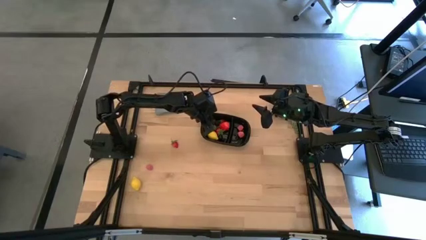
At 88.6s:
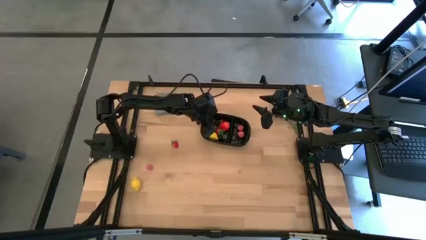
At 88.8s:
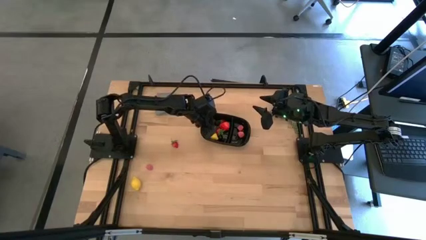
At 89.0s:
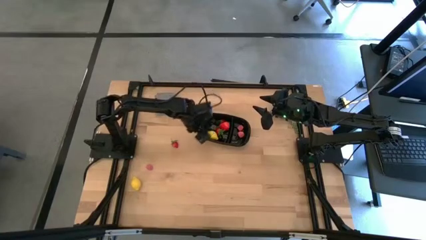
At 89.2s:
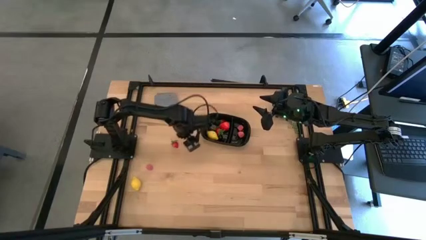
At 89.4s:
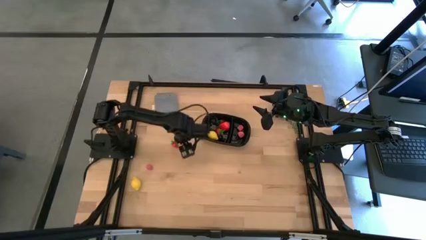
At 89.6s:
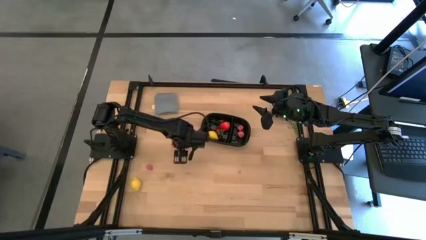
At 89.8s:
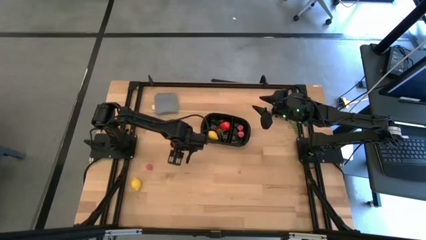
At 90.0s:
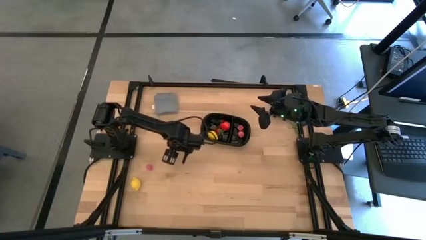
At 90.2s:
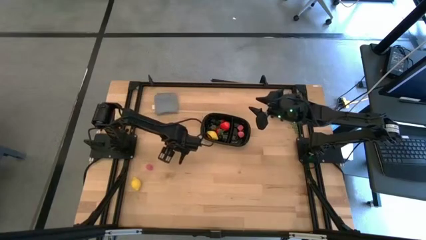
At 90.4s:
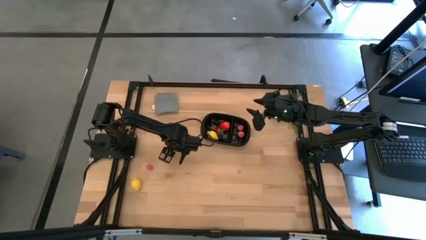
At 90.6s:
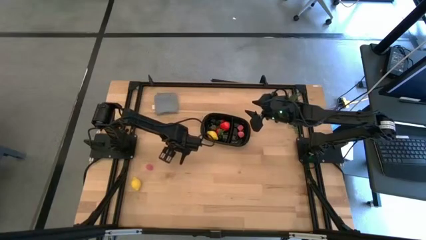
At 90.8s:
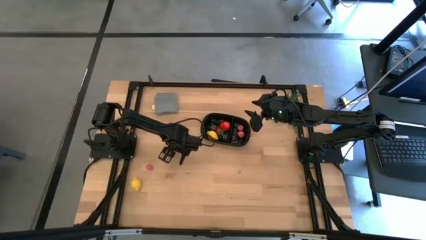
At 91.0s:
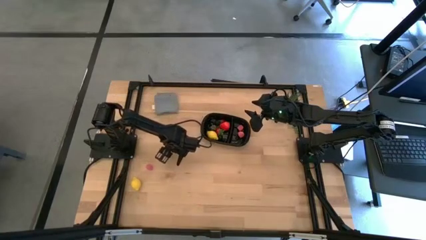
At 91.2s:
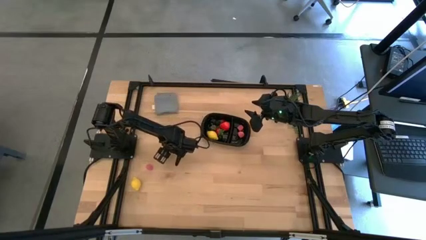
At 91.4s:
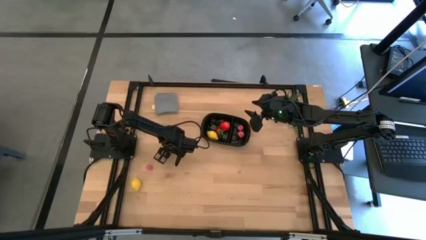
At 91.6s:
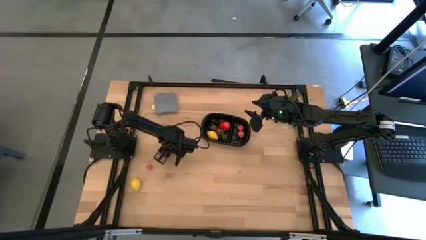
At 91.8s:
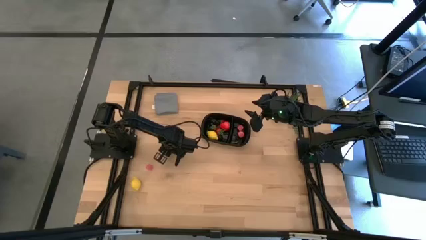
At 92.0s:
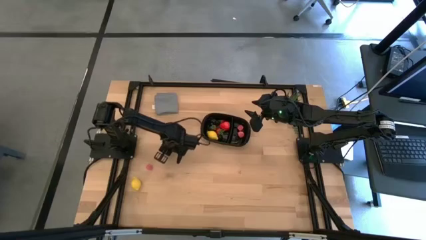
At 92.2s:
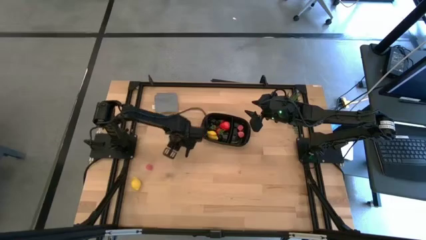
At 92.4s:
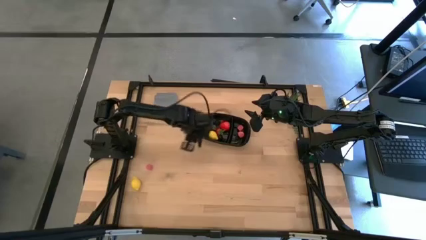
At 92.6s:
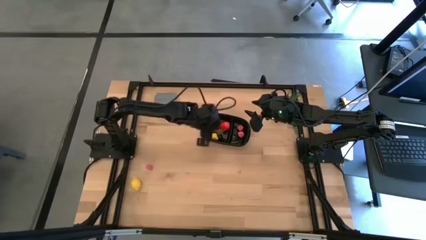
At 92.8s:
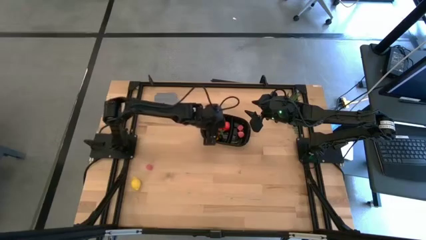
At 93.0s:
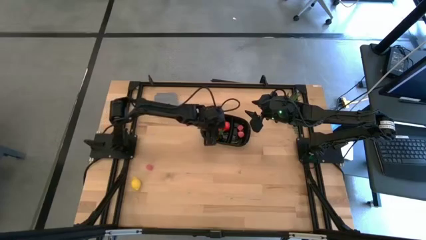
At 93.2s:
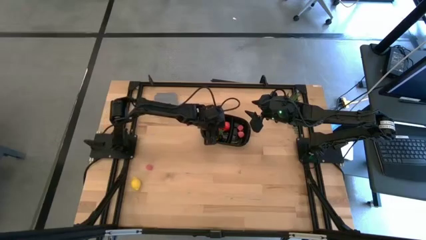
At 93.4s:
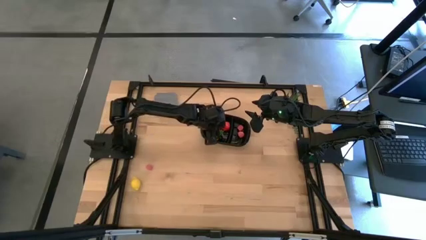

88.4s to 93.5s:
Task: Pick and placing Produce into tupperware
Put the red strawberry into the black container

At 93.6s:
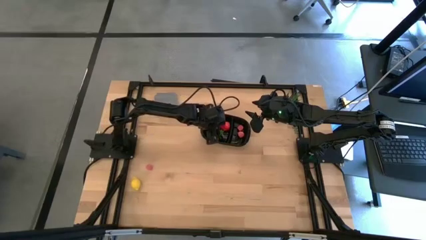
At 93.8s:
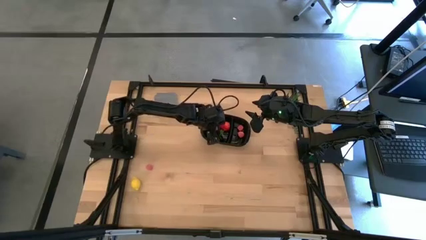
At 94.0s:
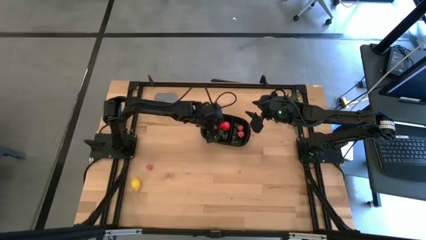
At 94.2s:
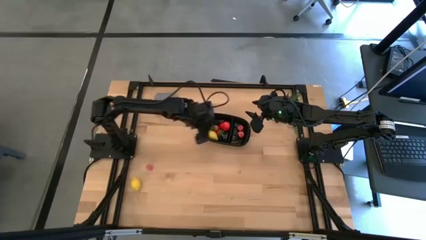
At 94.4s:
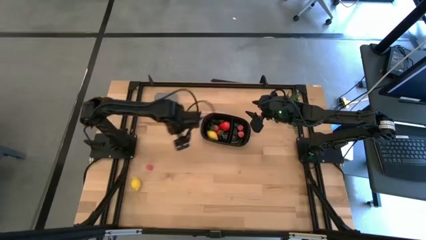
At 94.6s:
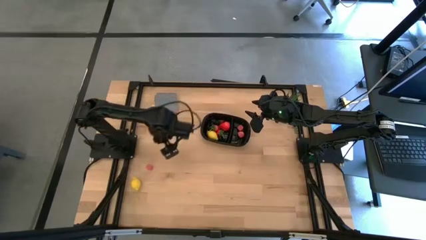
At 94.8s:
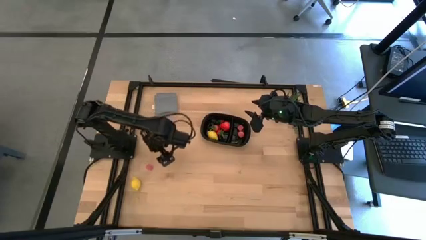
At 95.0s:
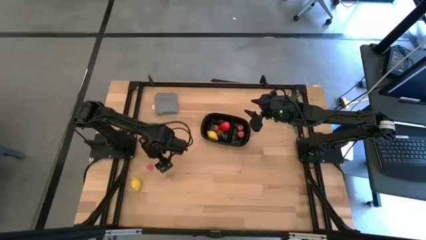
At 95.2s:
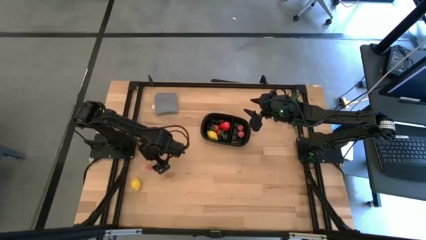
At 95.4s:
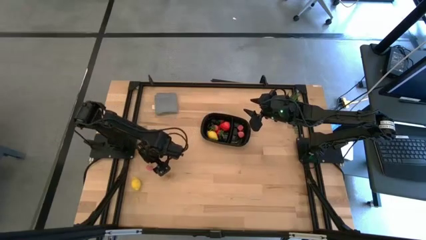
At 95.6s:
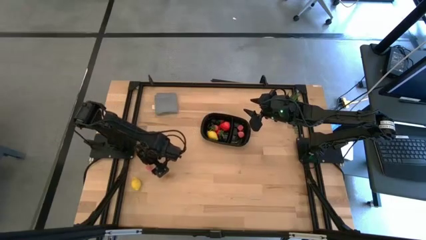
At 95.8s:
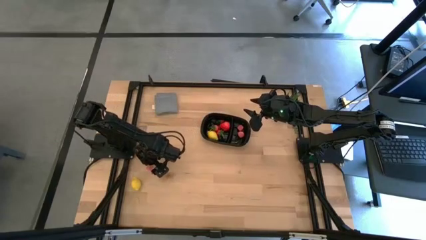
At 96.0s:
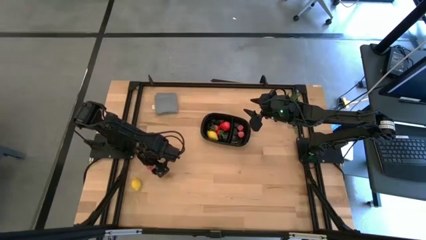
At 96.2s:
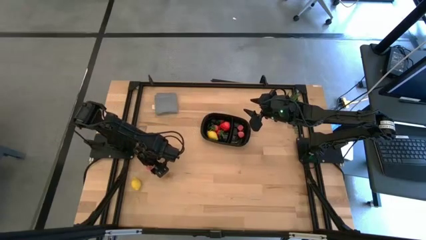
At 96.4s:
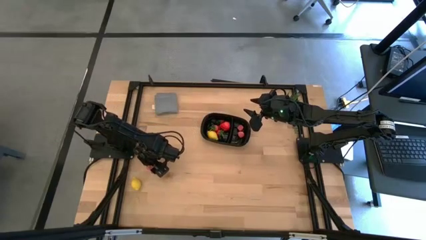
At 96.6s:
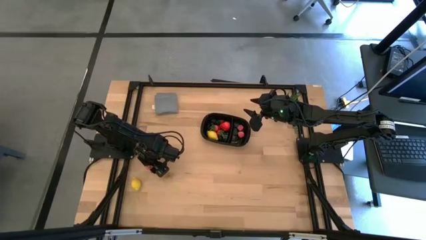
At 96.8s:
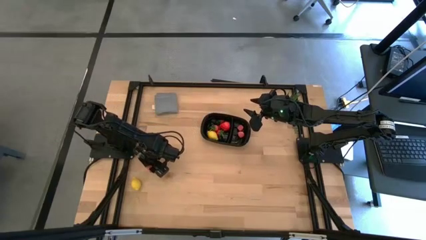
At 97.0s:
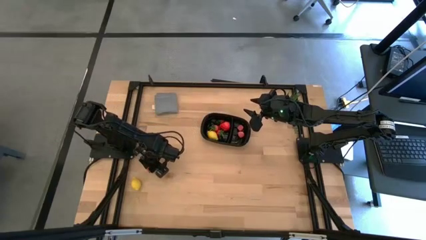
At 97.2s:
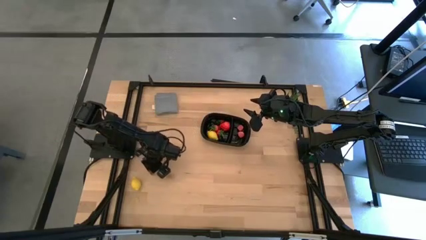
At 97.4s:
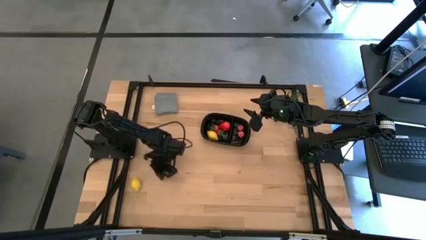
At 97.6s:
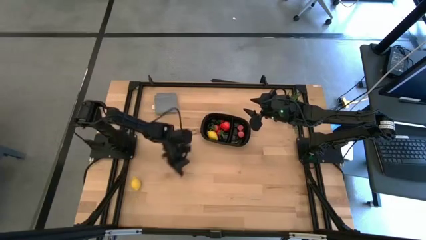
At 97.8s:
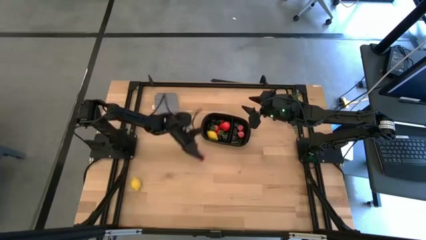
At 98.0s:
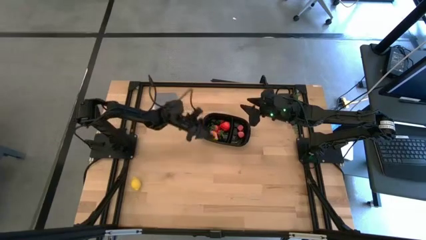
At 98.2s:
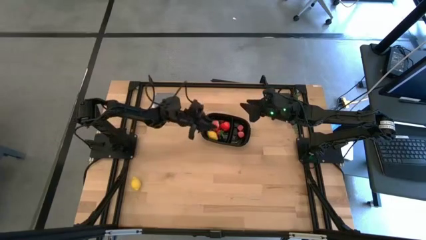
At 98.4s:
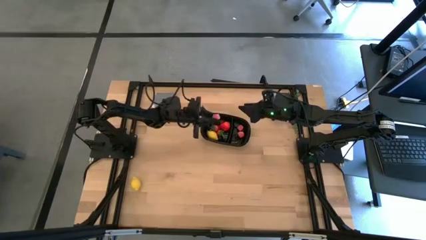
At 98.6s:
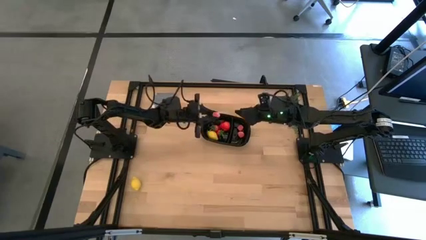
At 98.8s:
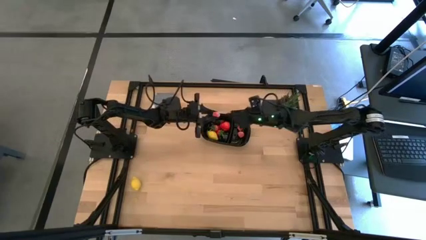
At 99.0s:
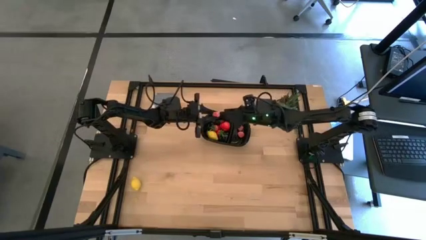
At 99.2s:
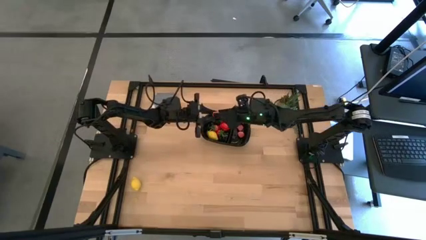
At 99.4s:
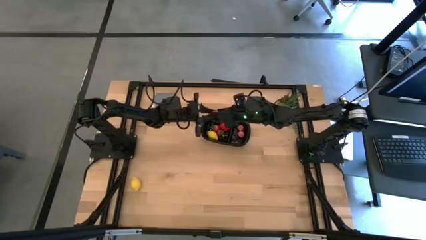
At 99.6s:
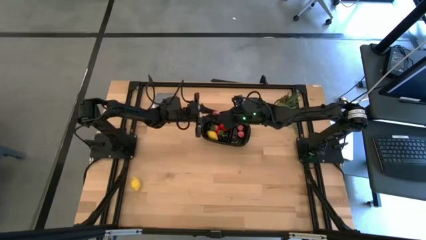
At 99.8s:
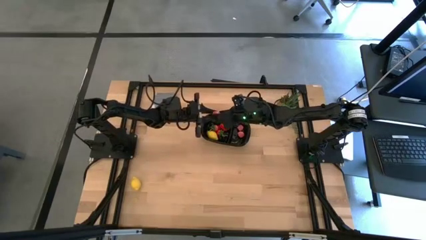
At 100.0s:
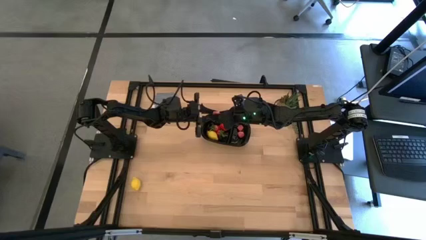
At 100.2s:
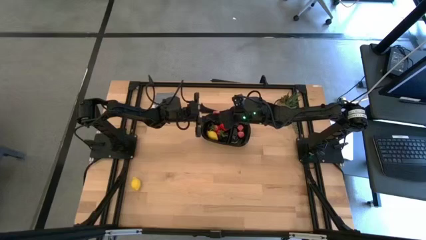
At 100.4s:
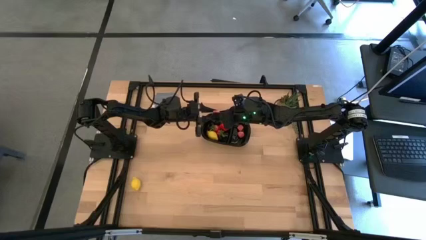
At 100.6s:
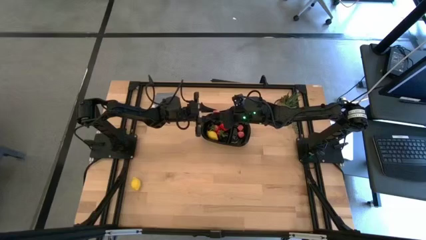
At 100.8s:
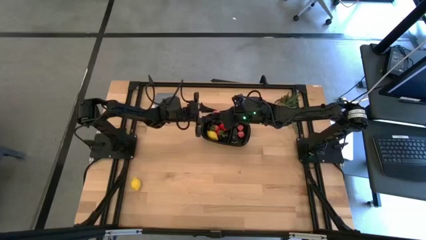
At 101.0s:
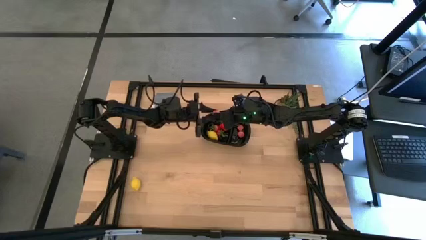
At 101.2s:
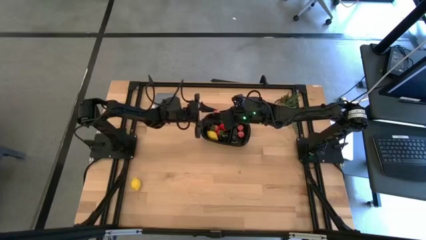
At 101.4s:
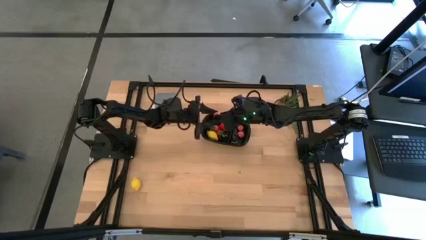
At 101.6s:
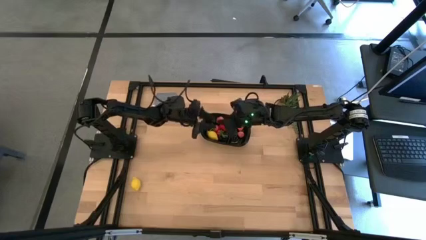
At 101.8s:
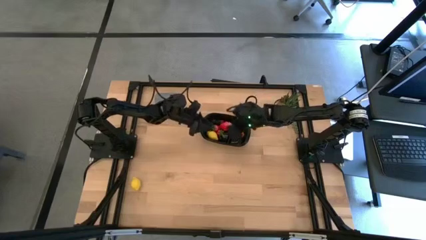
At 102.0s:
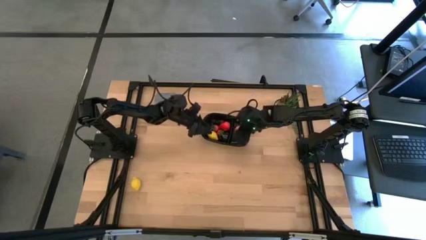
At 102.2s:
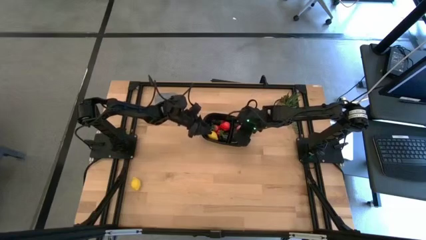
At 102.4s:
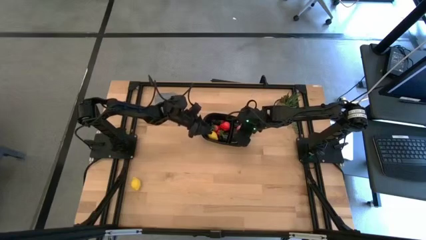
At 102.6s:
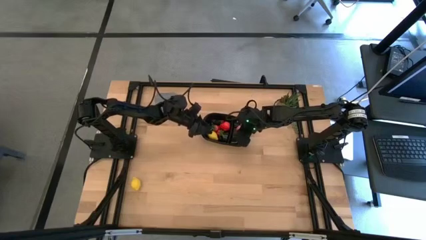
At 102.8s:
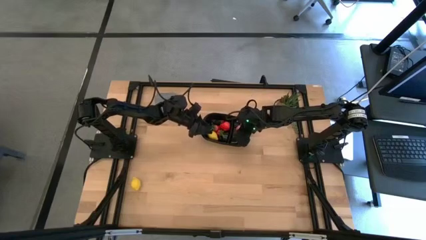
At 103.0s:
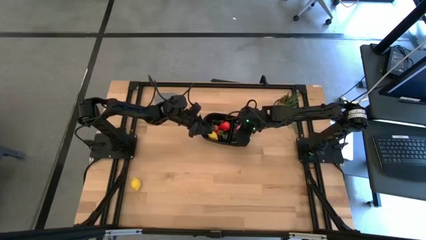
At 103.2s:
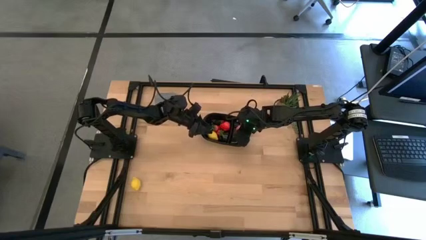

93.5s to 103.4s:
Put the pink peach into the black container

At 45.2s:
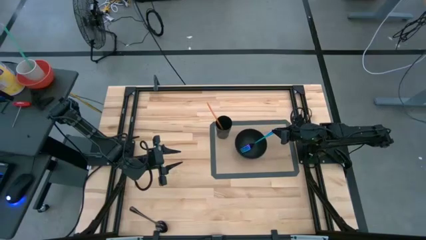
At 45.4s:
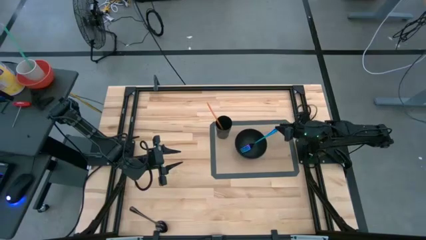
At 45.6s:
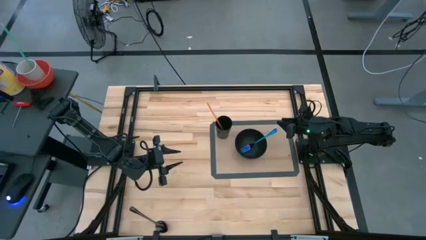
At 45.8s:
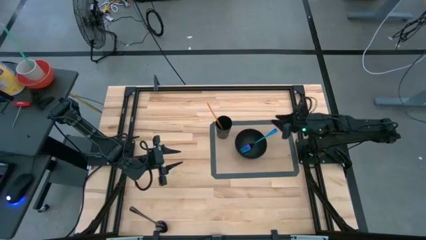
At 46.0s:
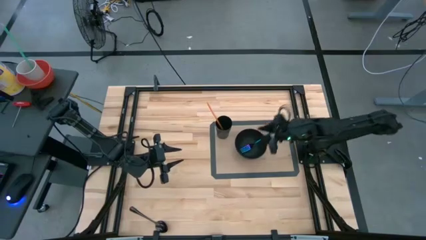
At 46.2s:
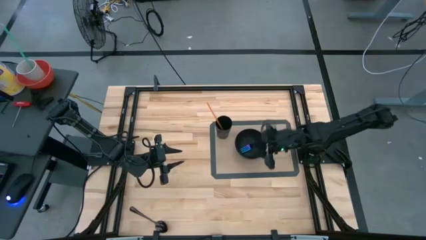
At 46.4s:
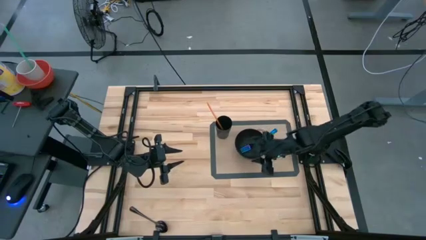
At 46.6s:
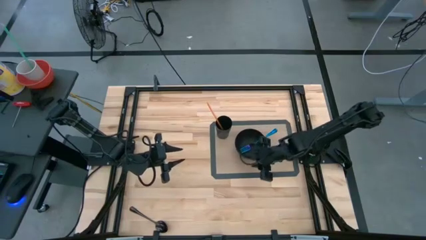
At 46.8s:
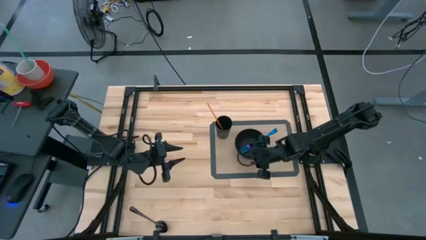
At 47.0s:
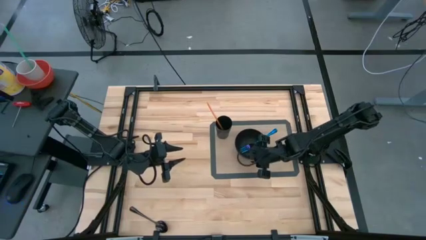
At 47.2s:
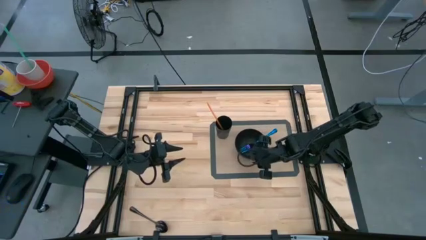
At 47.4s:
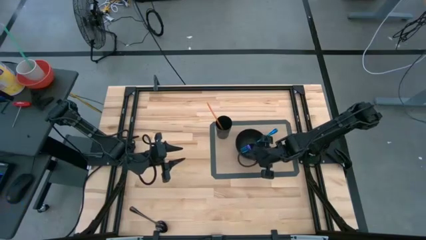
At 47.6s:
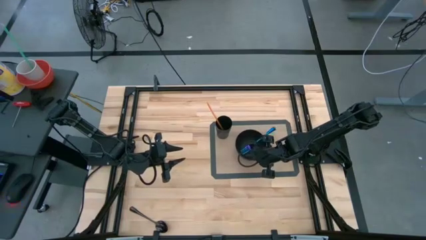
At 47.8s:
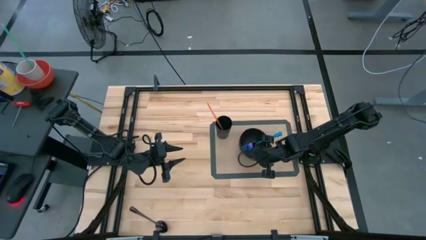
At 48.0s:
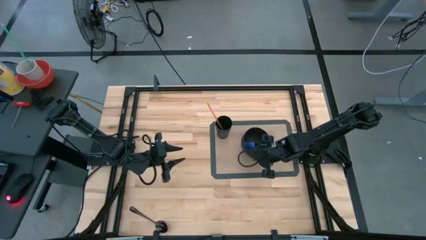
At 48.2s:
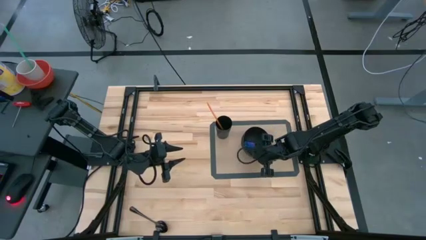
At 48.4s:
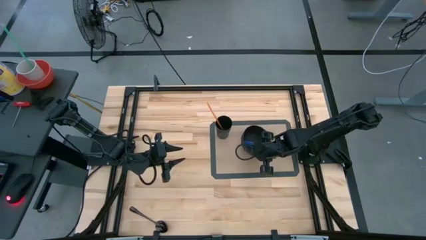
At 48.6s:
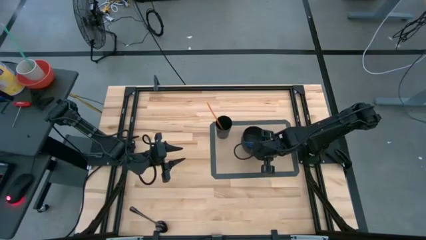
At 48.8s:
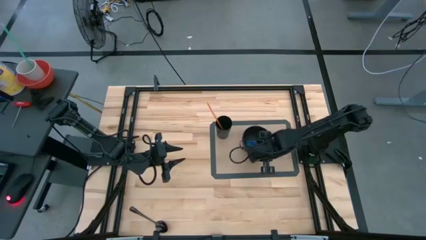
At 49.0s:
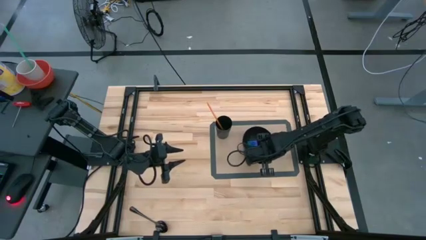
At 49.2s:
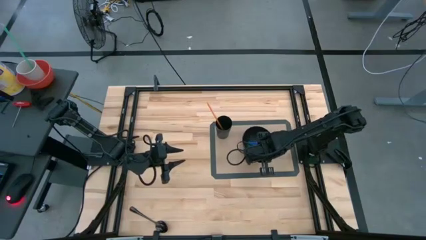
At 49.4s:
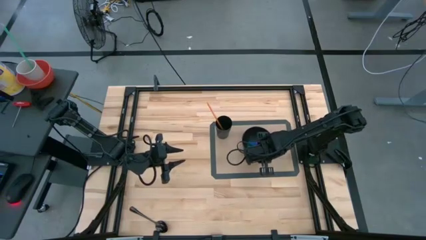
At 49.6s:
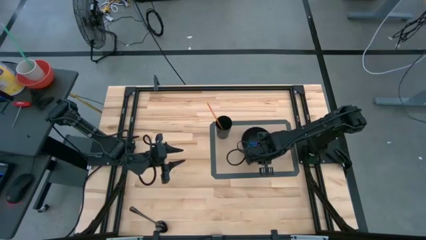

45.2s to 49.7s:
Task: Pick & Place Utensil
Adjust the black bowl on the gray mat
